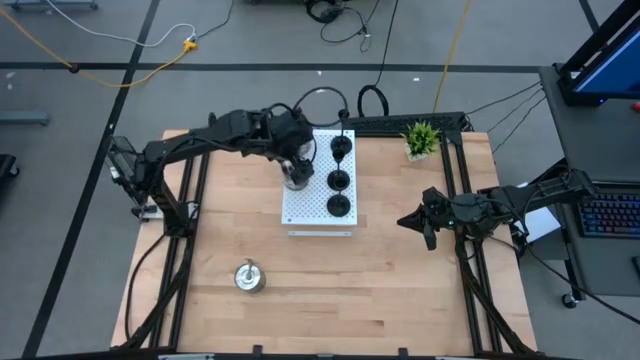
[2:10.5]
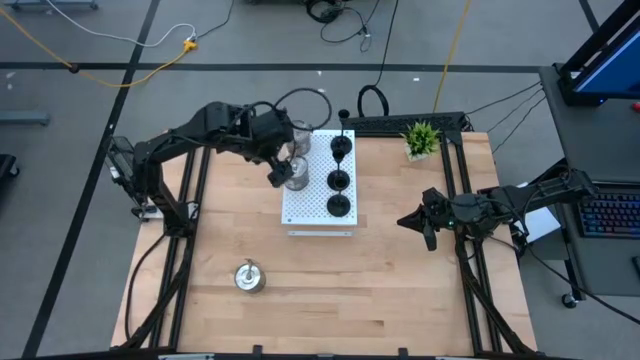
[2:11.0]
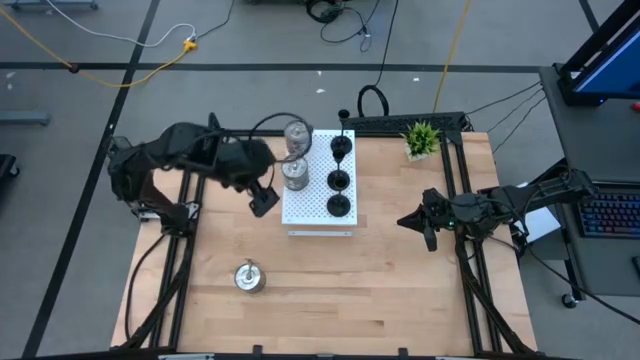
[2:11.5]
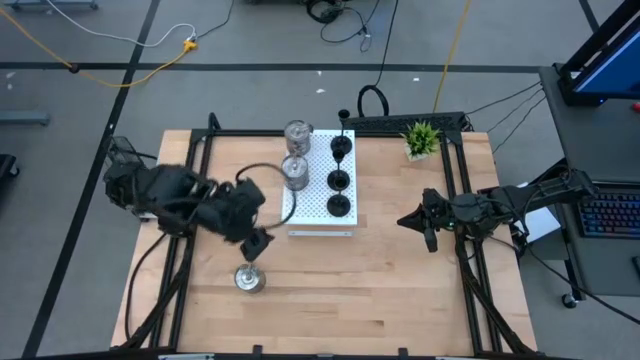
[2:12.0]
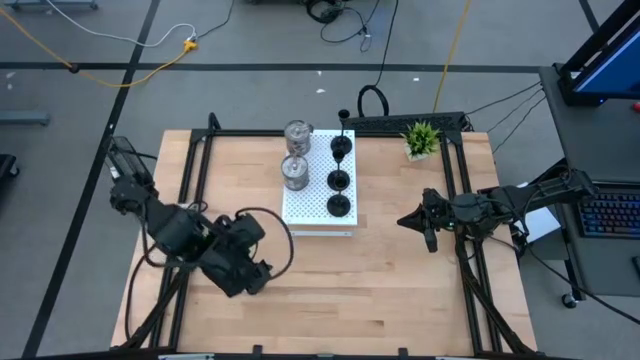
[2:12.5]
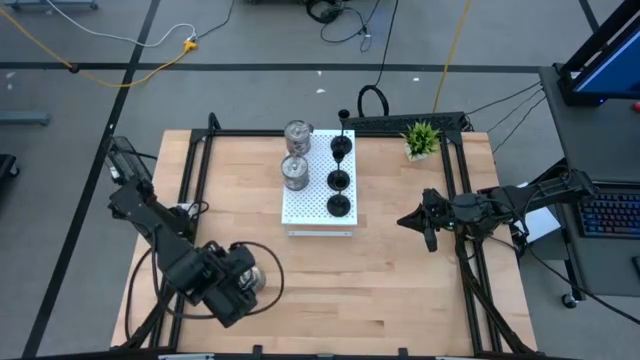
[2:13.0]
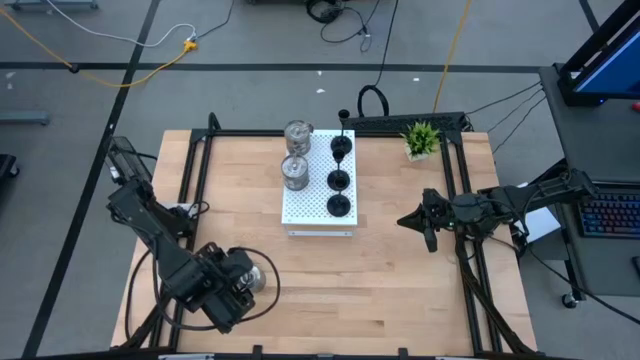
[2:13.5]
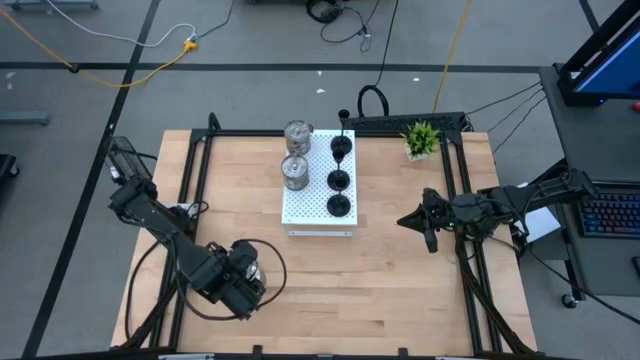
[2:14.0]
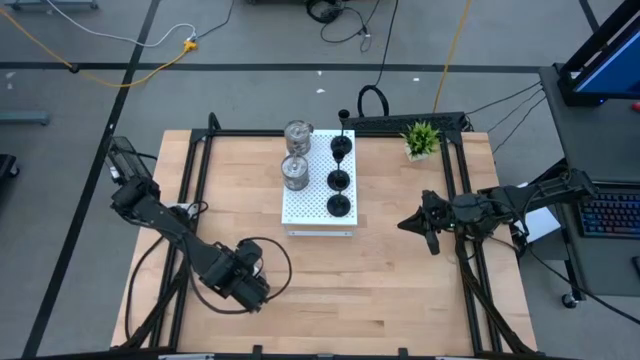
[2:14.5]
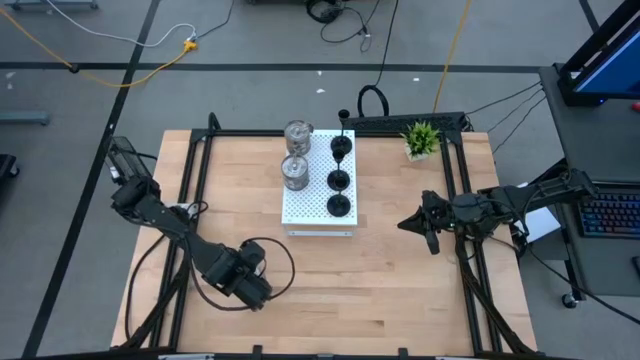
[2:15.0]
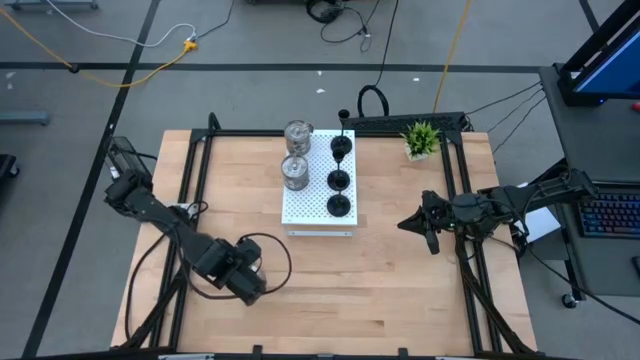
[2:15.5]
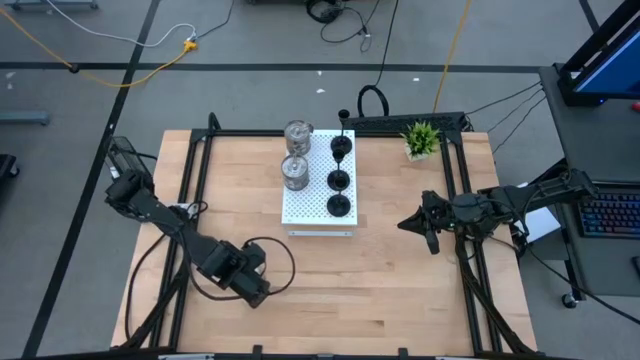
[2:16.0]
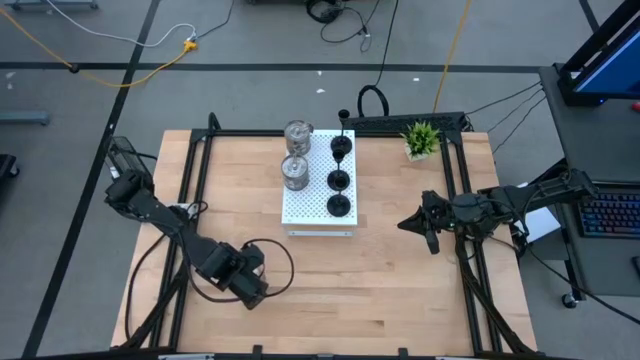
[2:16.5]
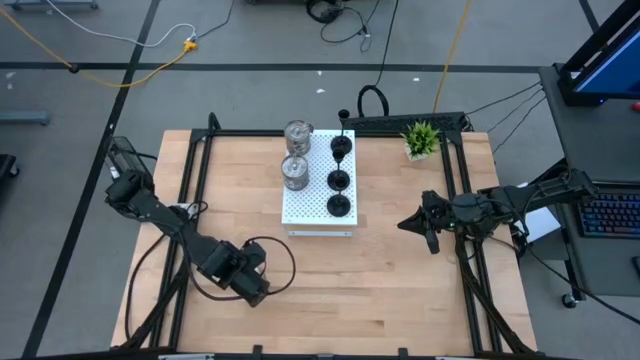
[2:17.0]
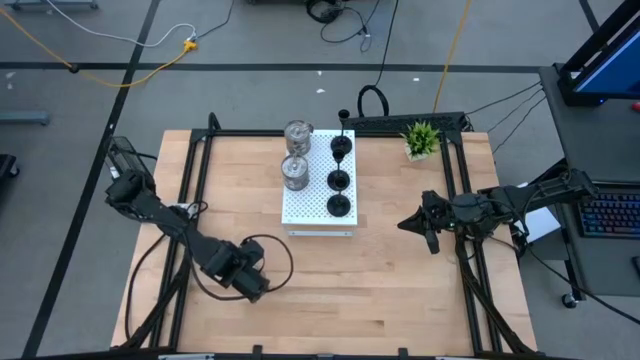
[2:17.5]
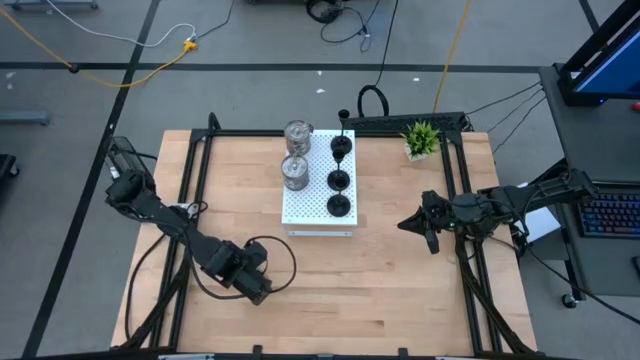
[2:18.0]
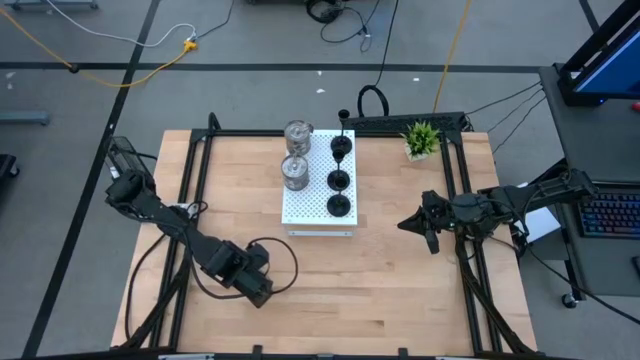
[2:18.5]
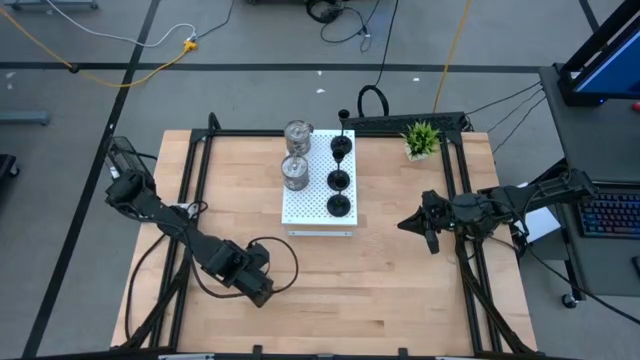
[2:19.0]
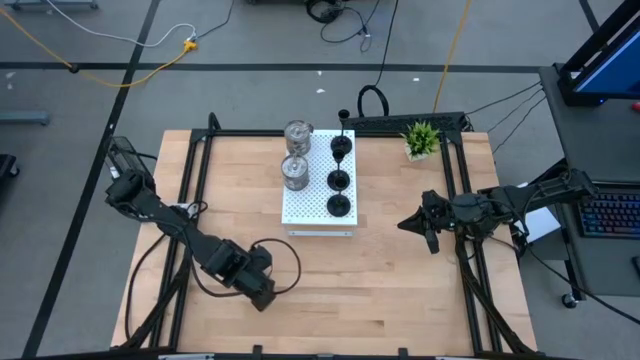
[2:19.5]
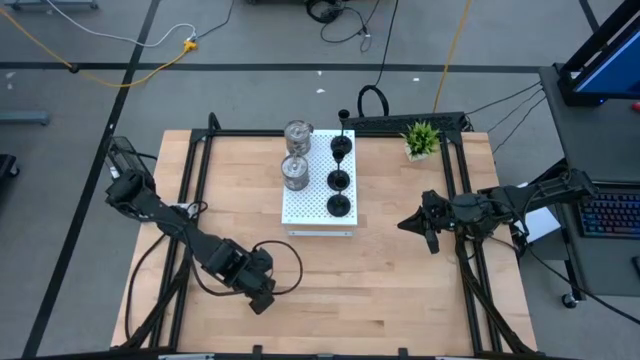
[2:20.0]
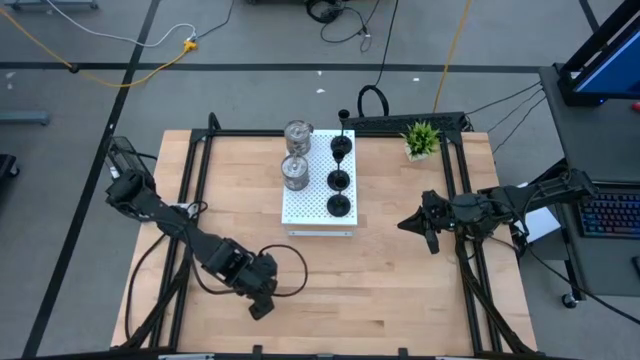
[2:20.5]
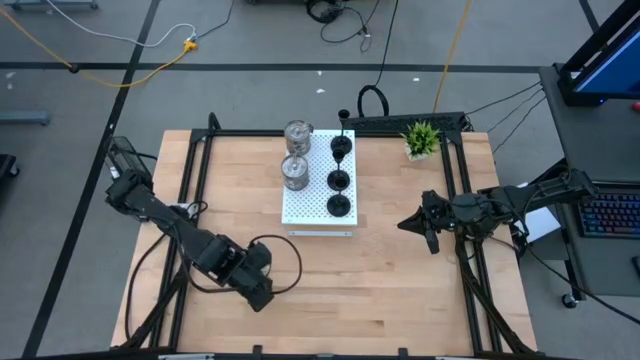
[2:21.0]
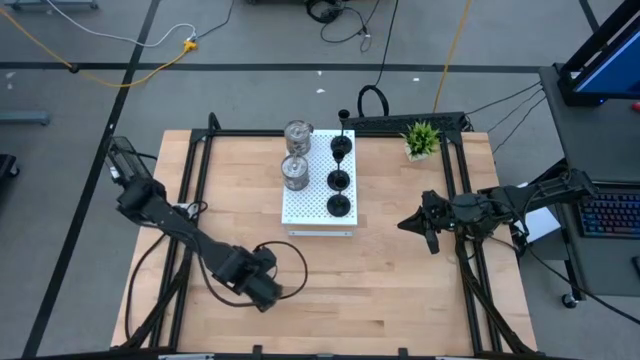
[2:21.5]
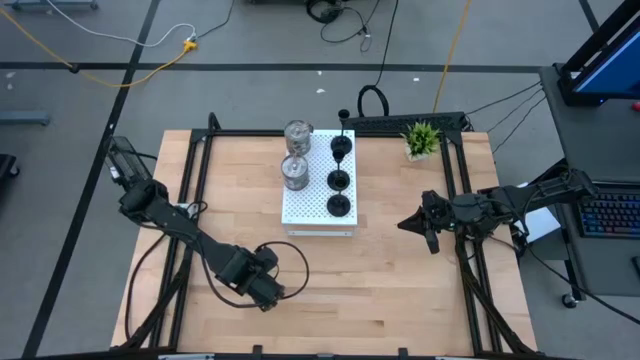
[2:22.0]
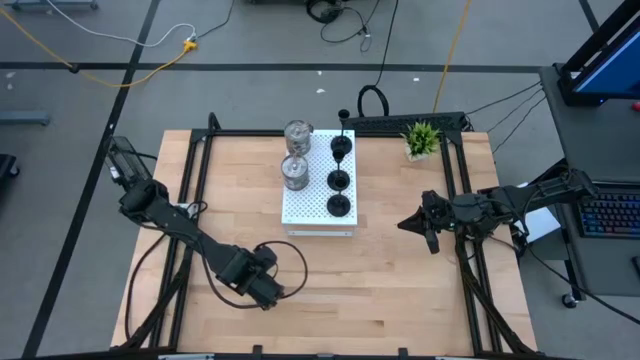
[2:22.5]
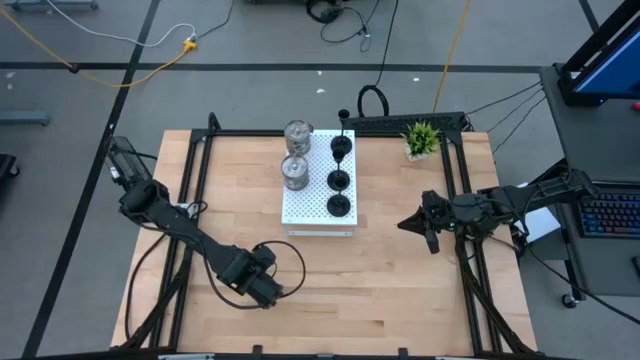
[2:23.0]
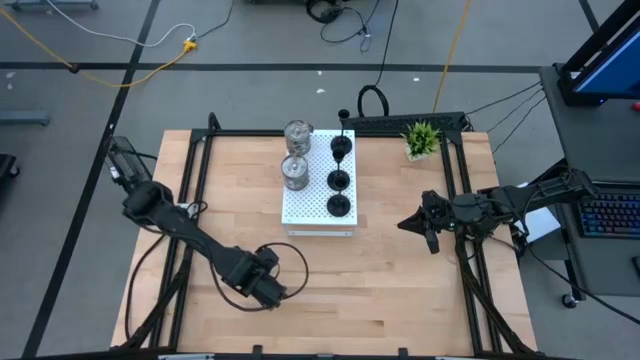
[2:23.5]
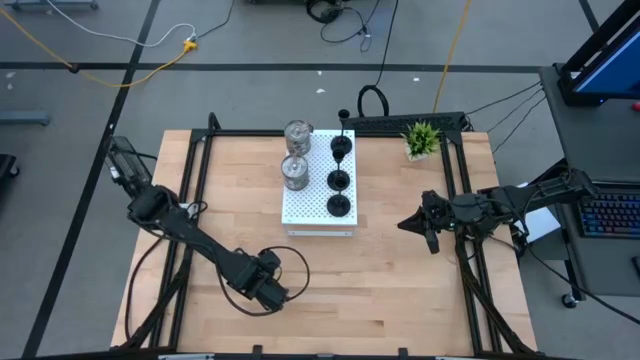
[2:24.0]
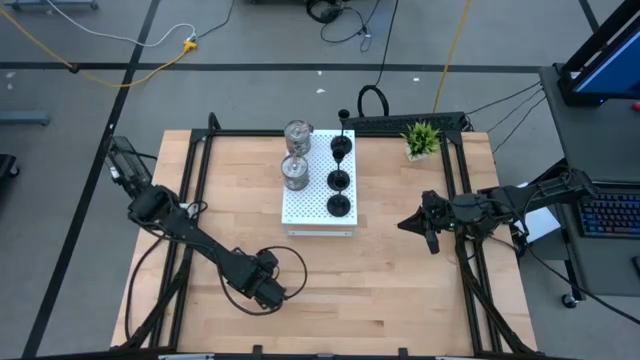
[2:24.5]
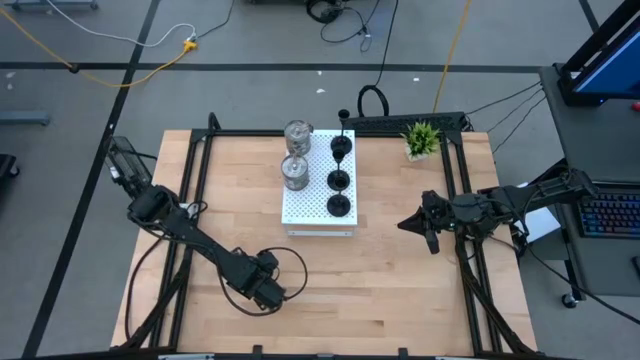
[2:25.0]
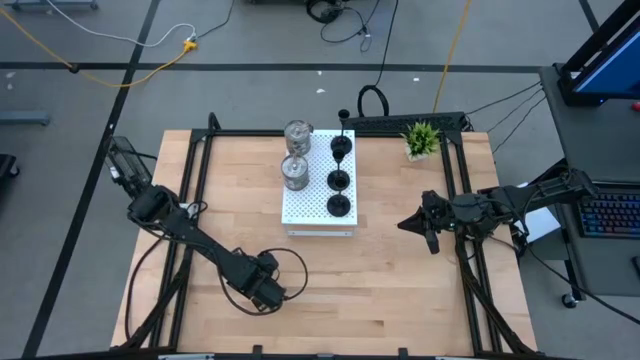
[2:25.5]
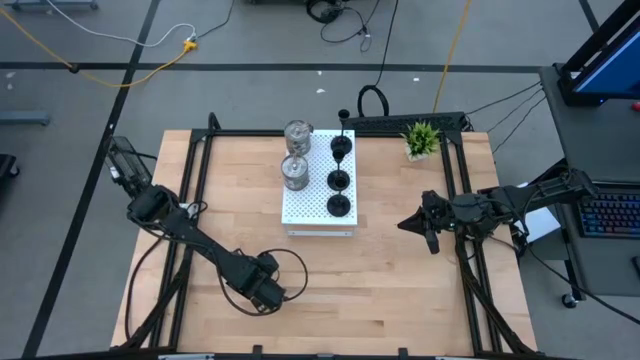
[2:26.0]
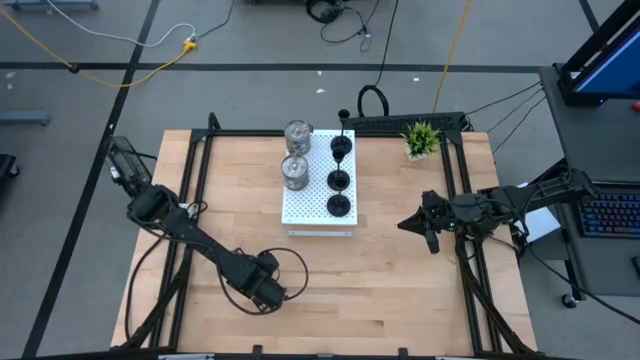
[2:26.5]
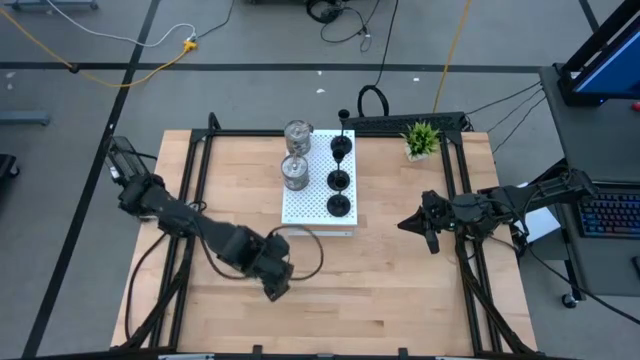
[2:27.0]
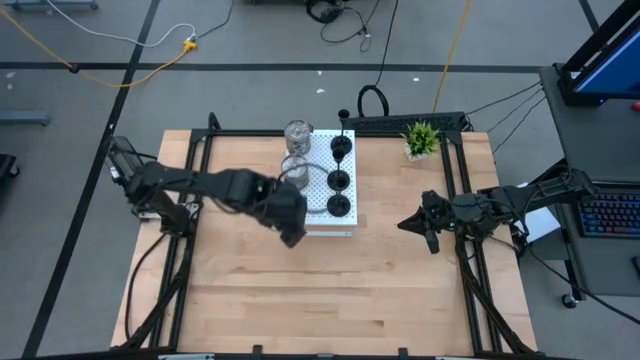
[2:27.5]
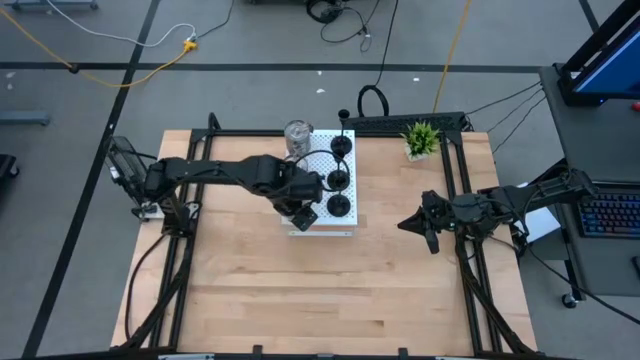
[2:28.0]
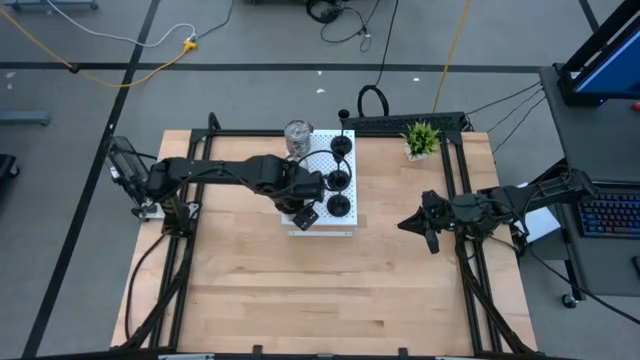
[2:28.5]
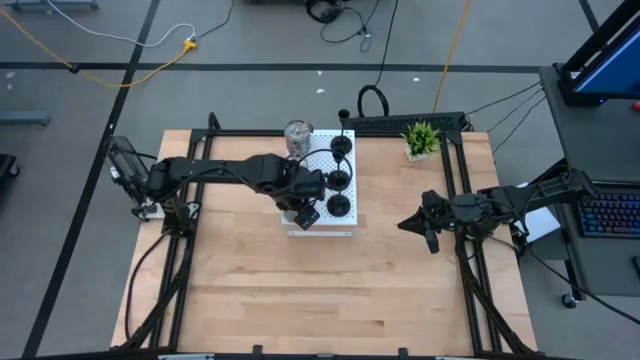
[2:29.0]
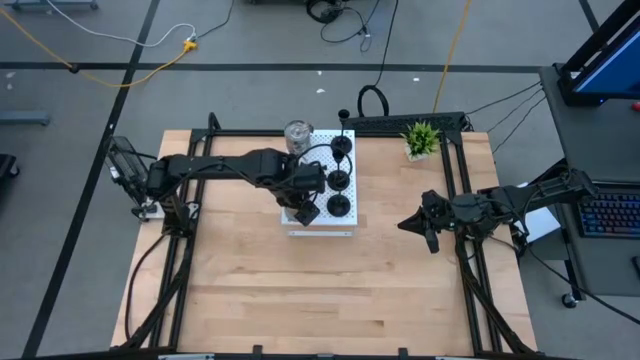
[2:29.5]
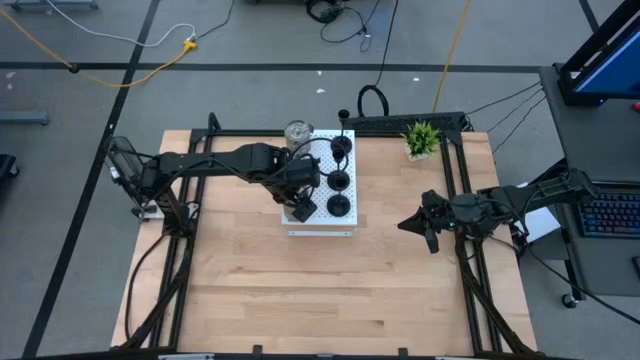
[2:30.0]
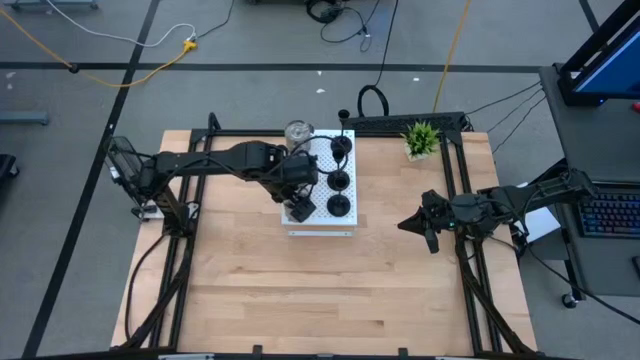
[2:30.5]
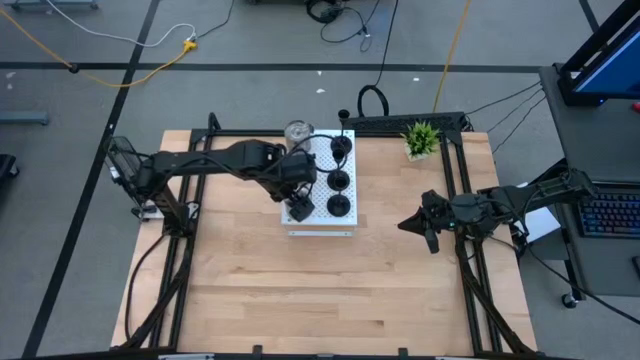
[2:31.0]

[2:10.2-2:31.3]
Task: Pick & Place candle stick holders
Put the brown scented candle on the shelf aligned with the other brown scented candles
